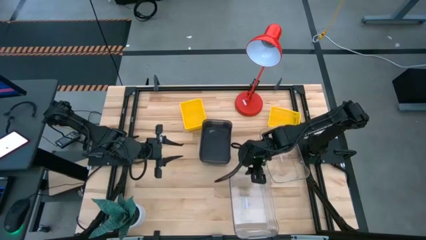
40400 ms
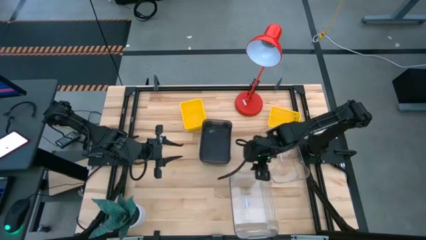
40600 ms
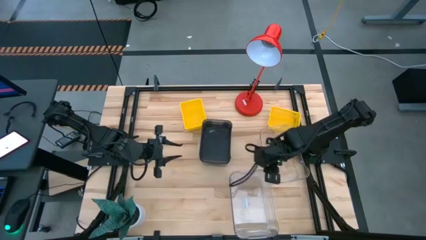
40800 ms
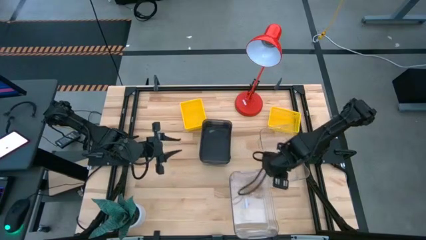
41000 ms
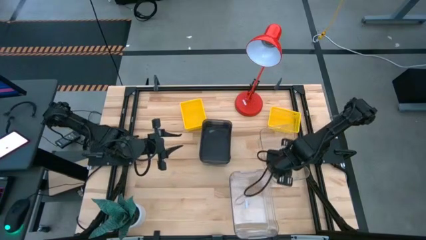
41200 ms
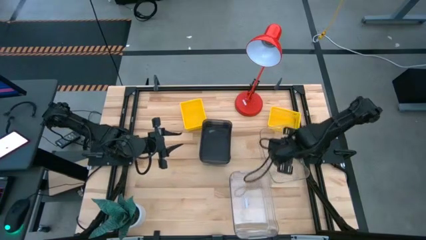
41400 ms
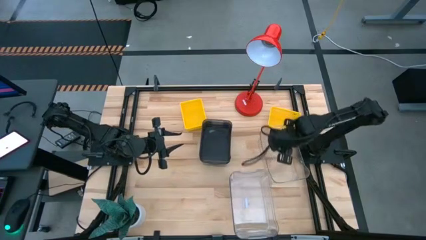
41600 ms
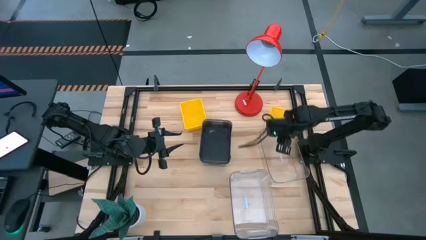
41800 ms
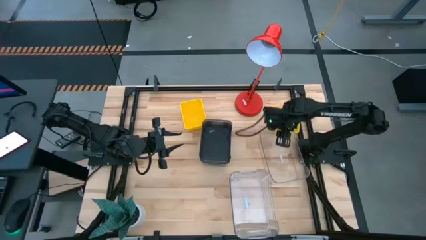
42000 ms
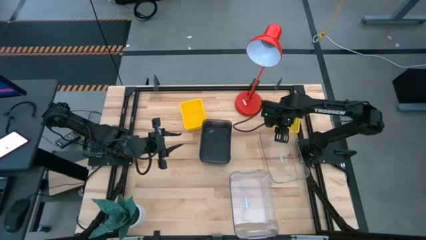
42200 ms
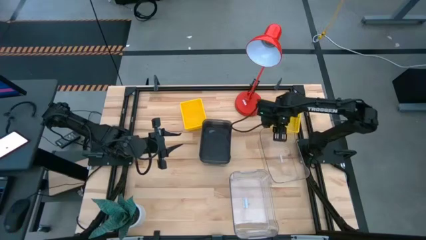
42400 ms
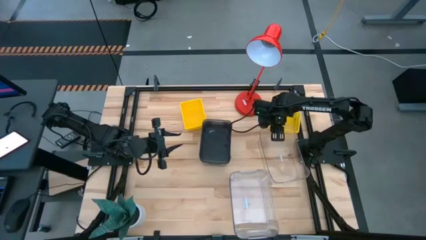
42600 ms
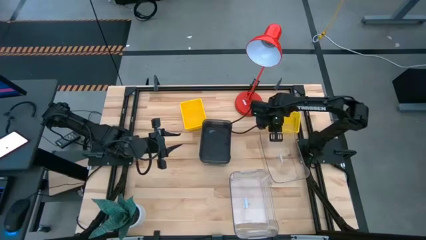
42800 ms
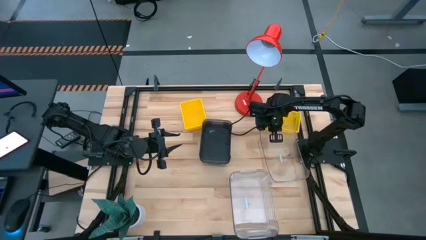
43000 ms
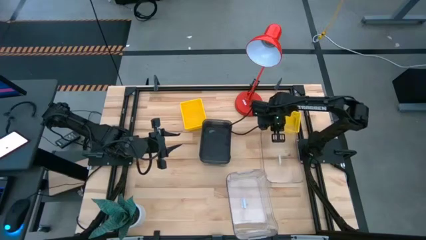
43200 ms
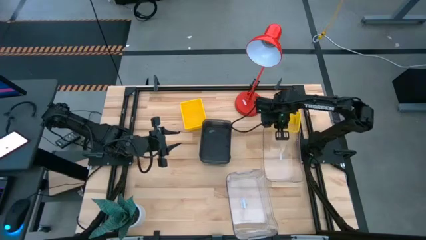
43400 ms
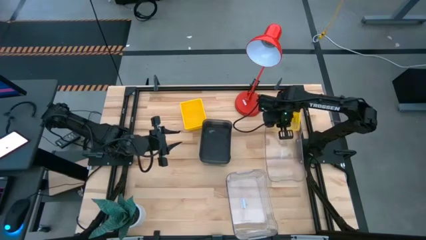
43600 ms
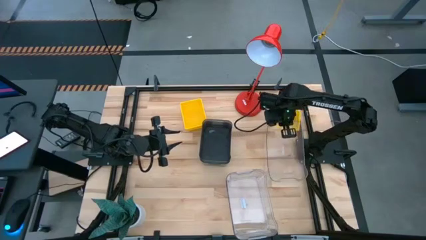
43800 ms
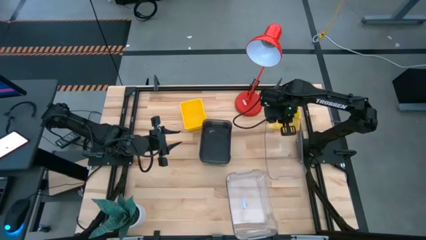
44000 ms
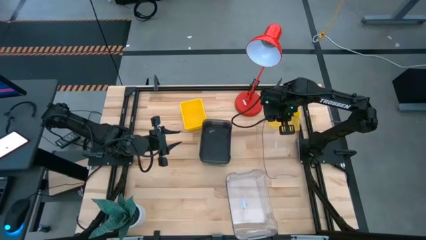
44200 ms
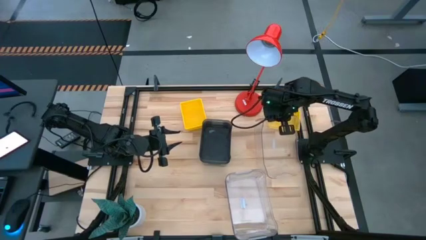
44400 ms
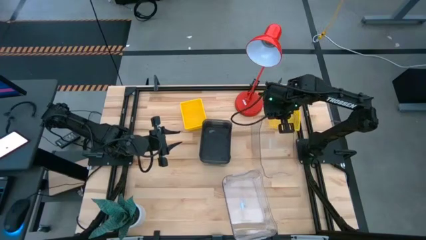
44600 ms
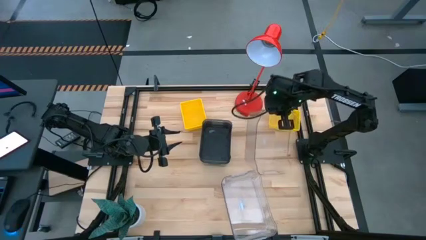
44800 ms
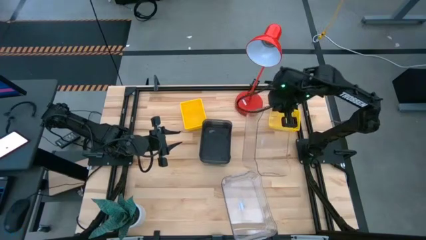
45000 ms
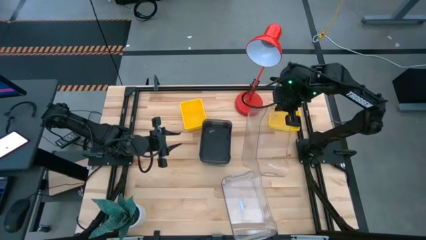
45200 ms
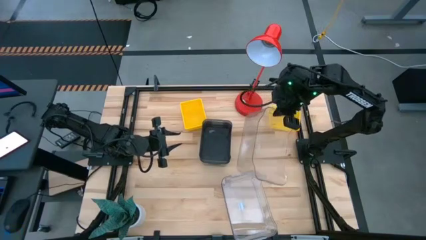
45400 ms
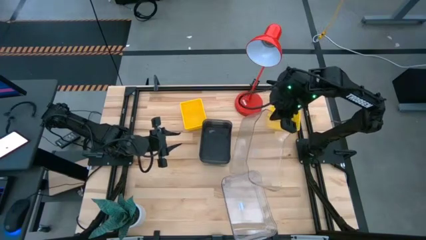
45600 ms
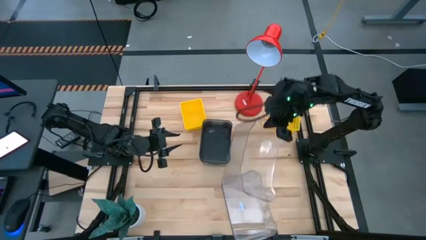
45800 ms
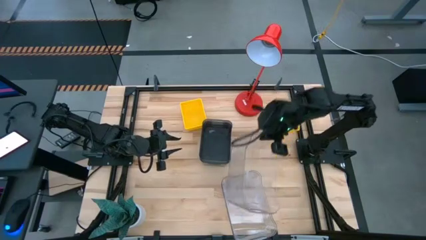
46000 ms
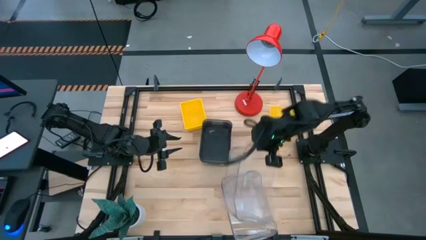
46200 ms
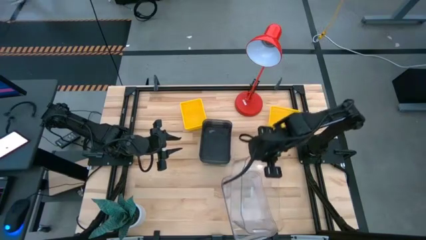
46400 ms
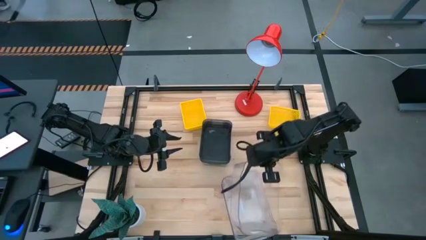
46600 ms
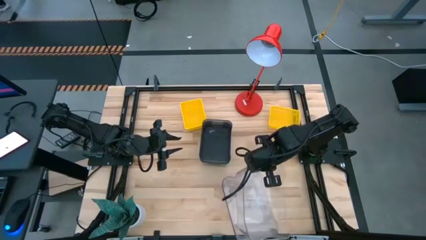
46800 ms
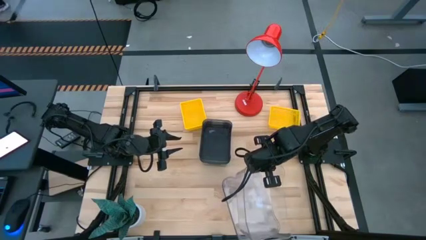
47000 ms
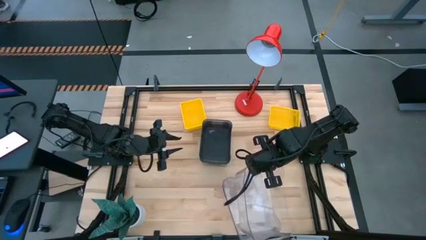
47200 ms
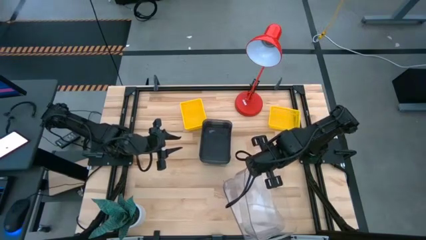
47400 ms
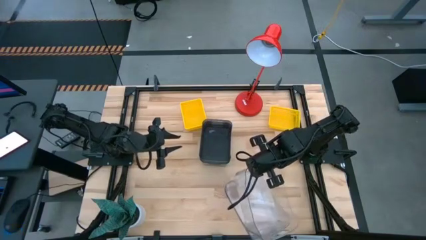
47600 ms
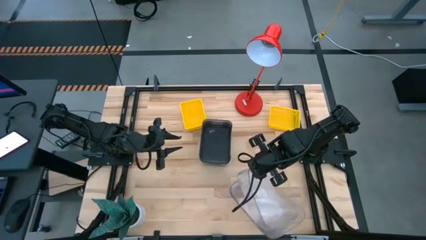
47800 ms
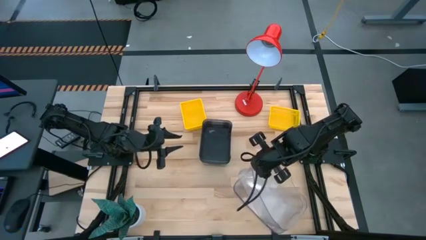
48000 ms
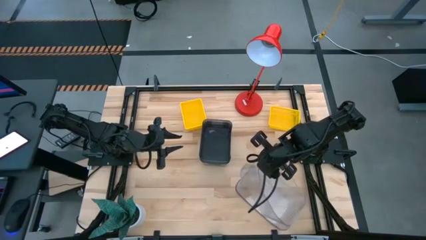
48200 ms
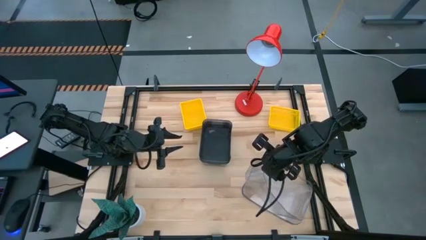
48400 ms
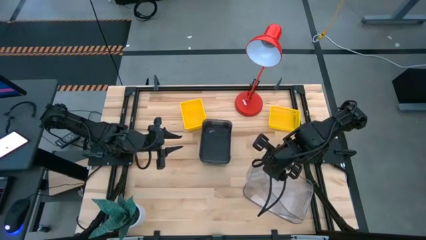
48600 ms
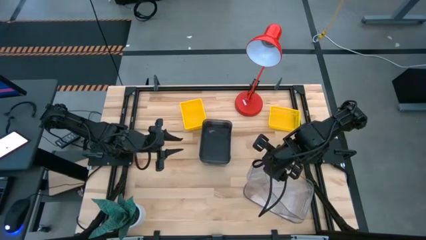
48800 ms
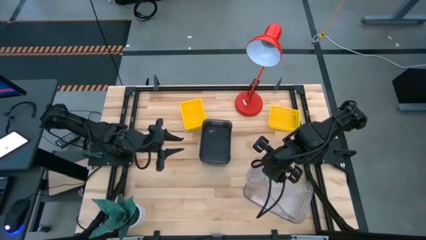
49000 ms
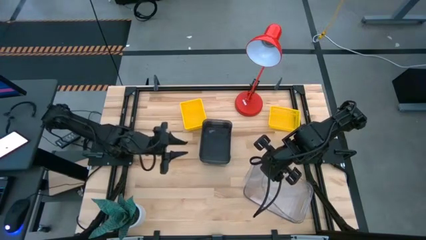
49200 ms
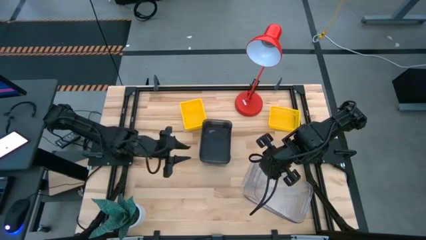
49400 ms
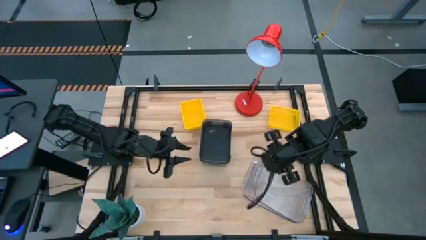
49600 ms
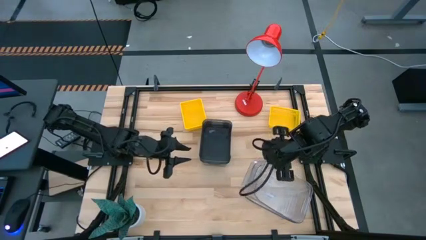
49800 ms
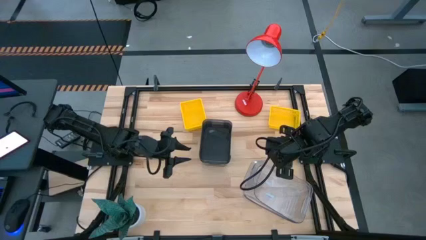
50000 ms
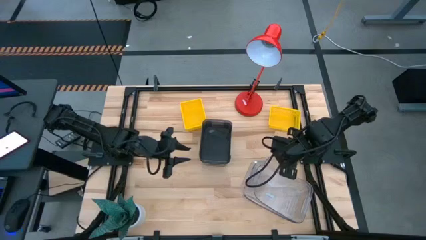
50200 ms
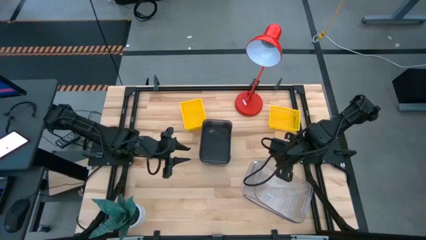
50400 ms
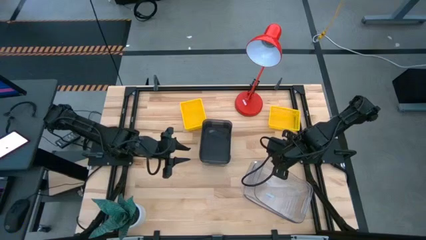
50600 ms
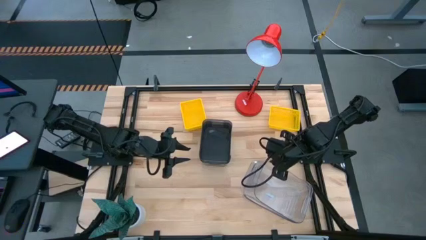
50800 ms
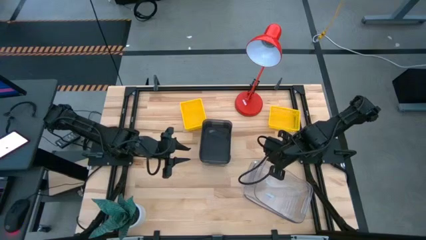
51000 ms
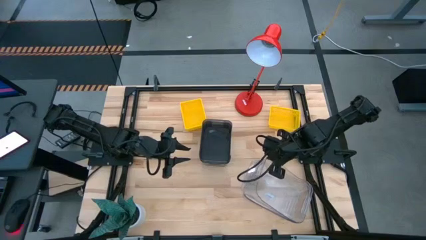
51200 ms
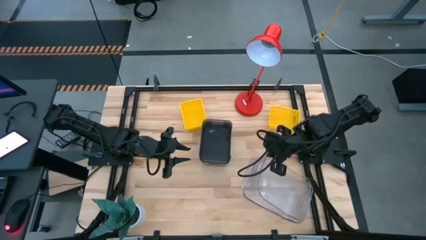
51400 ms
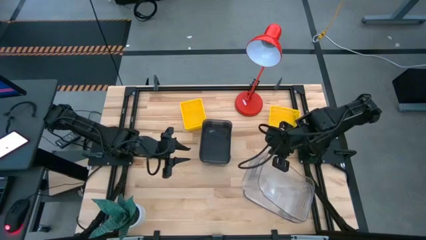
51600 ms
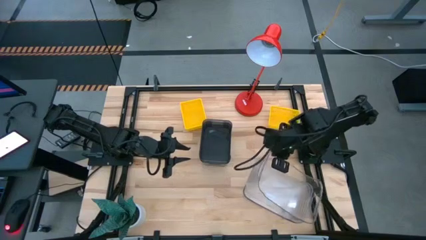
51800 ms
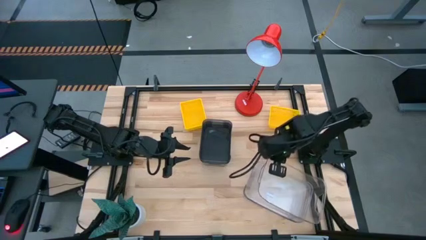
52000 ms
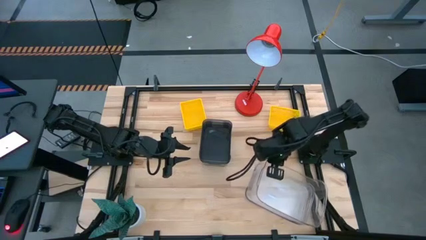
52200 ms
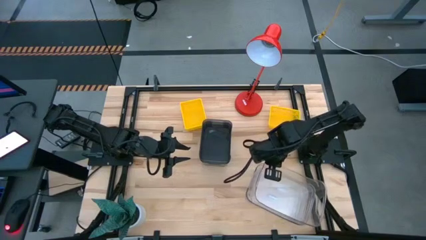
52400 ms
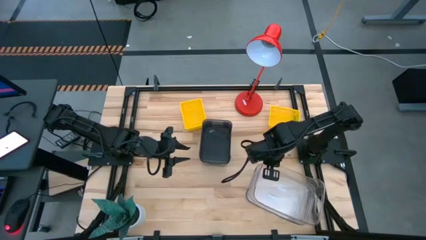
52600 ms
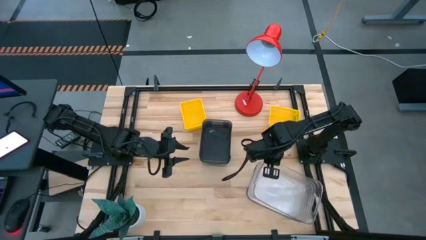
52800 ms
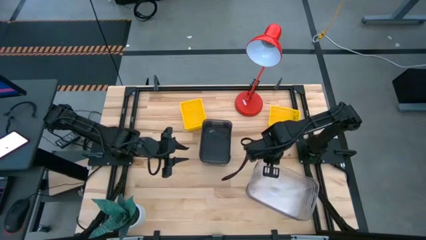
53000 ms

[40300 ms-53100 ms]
Stack the top transparent bin on the transparent bin
